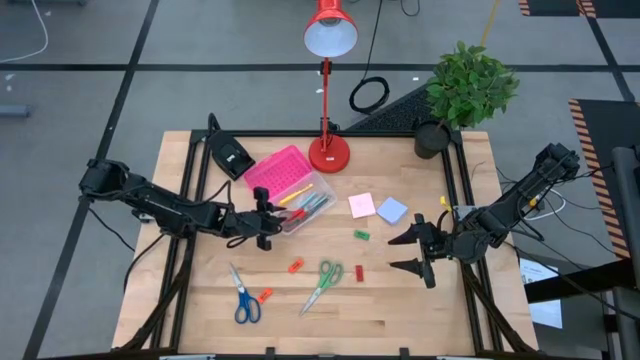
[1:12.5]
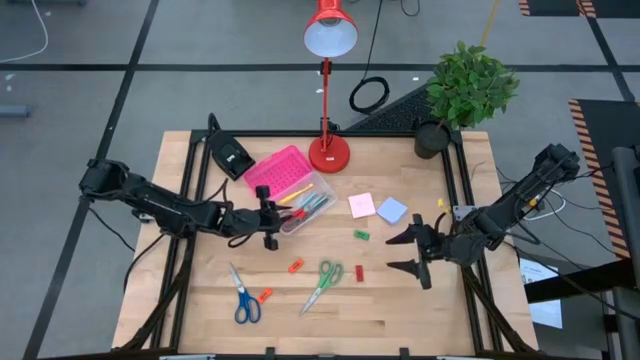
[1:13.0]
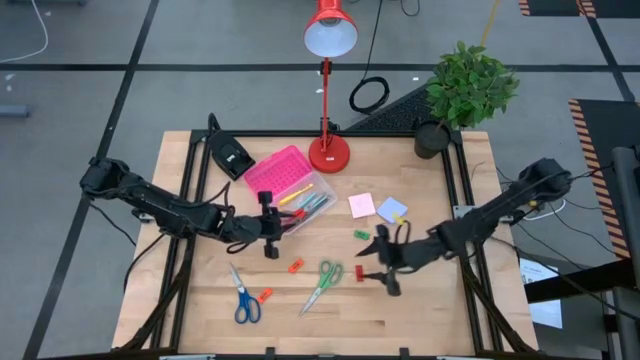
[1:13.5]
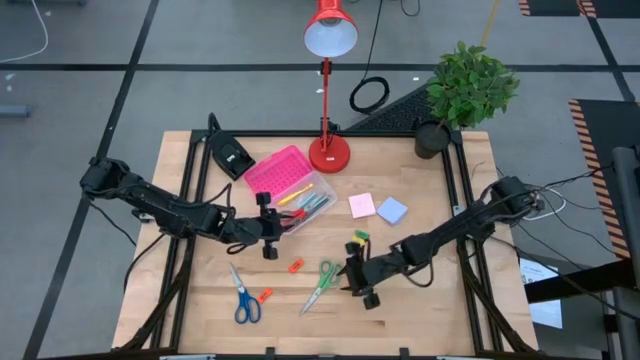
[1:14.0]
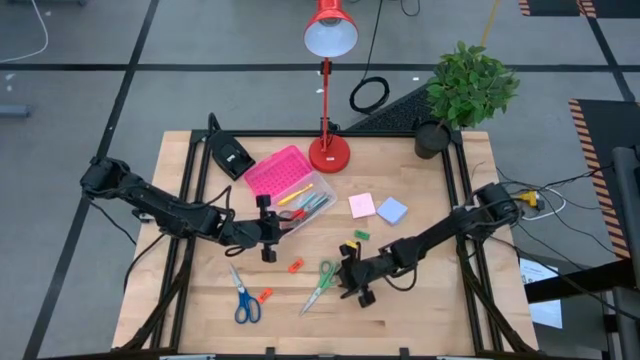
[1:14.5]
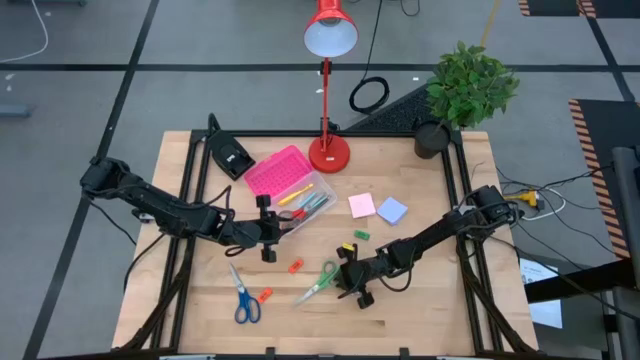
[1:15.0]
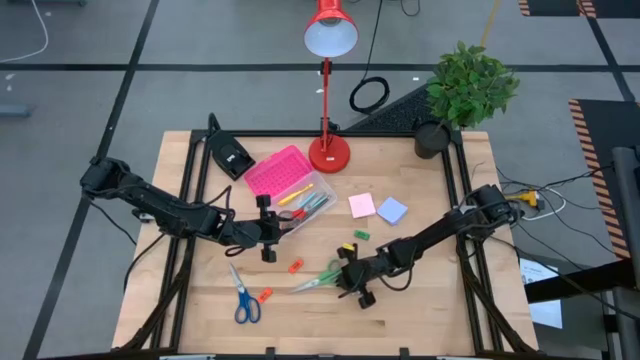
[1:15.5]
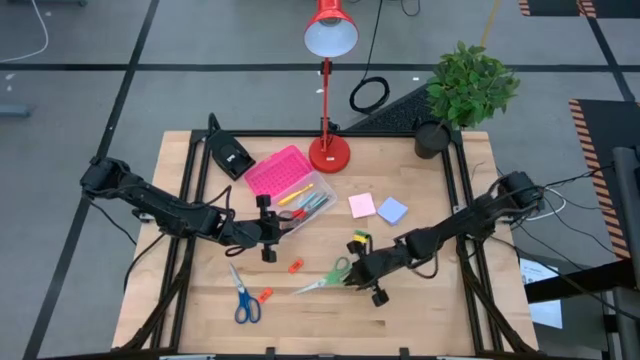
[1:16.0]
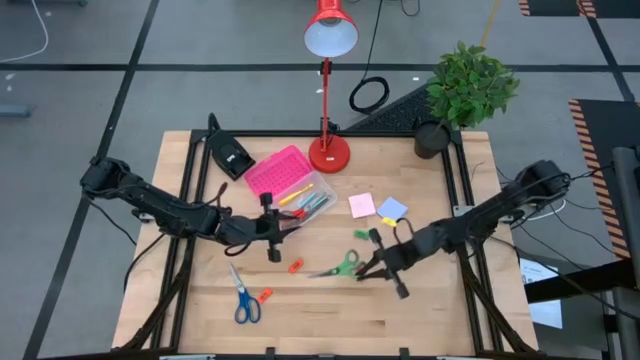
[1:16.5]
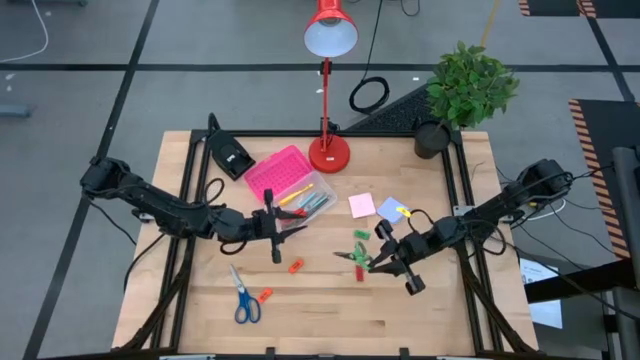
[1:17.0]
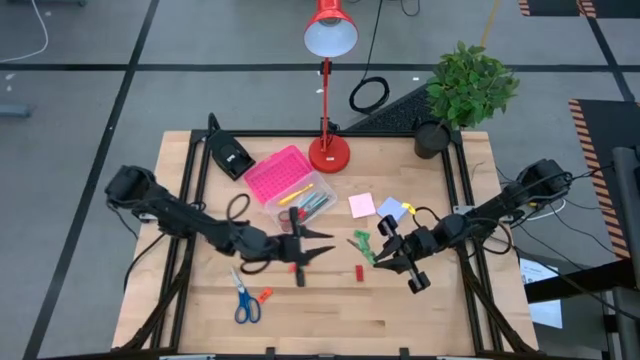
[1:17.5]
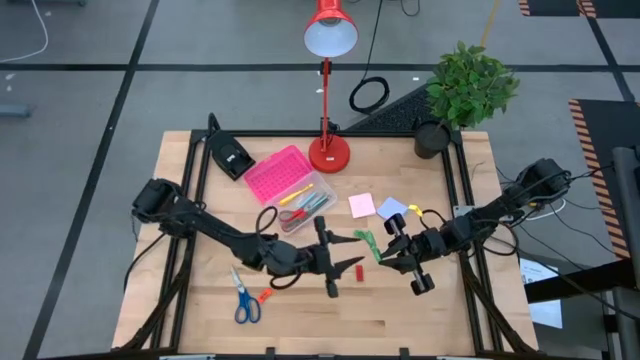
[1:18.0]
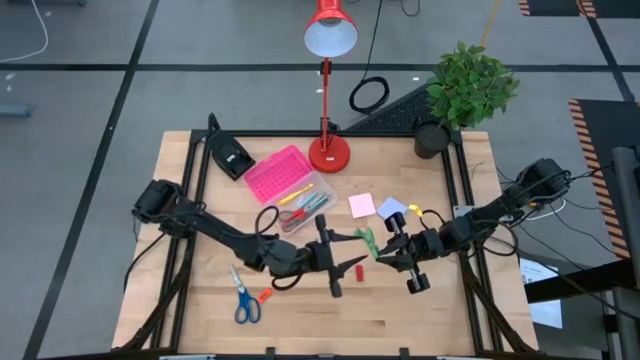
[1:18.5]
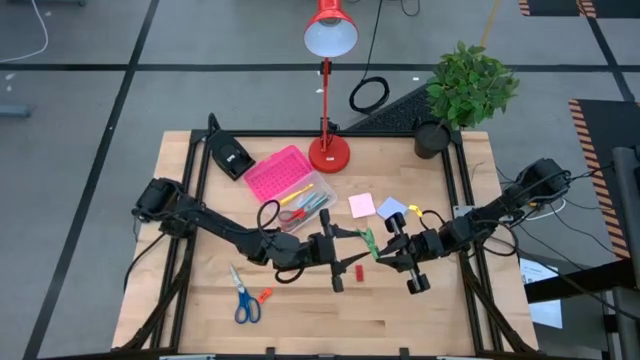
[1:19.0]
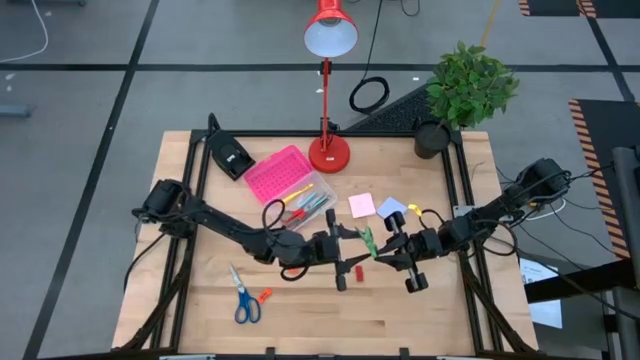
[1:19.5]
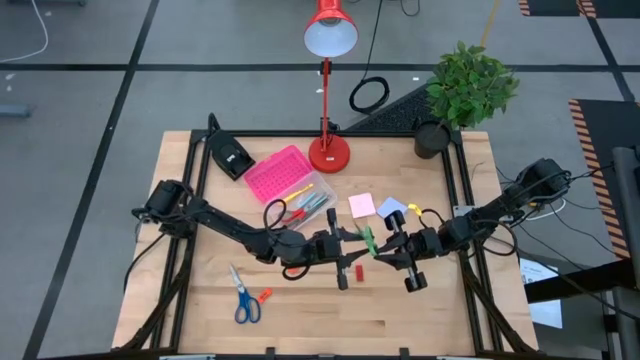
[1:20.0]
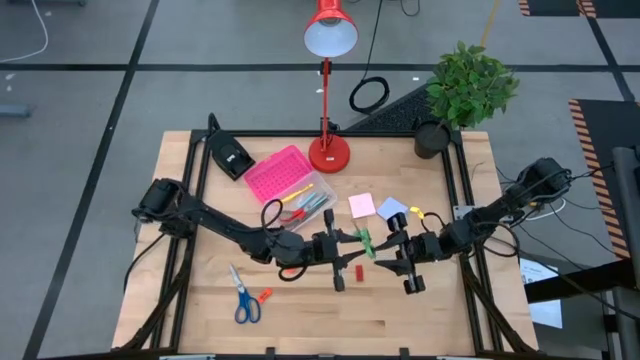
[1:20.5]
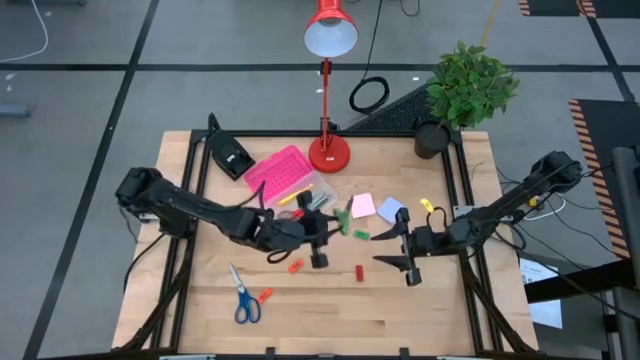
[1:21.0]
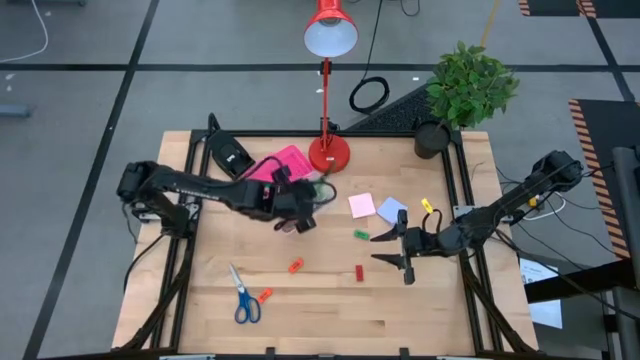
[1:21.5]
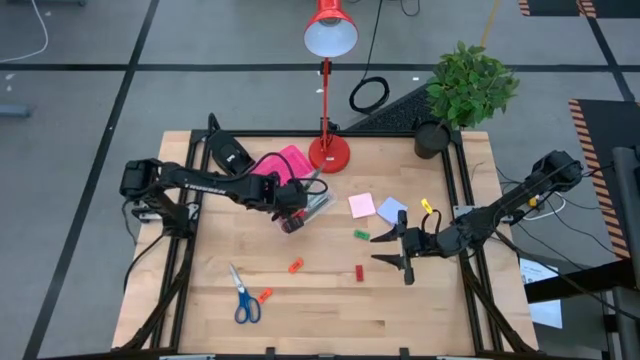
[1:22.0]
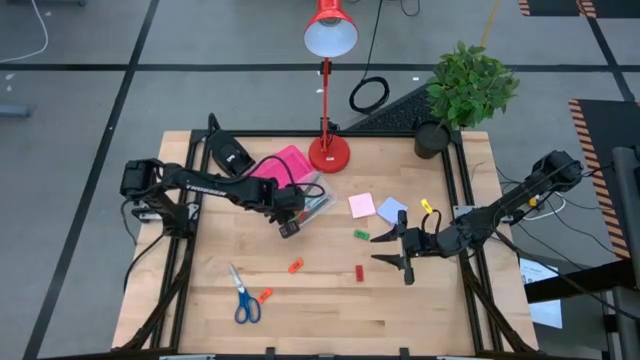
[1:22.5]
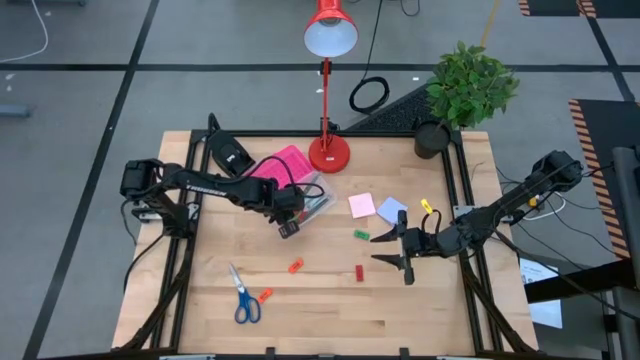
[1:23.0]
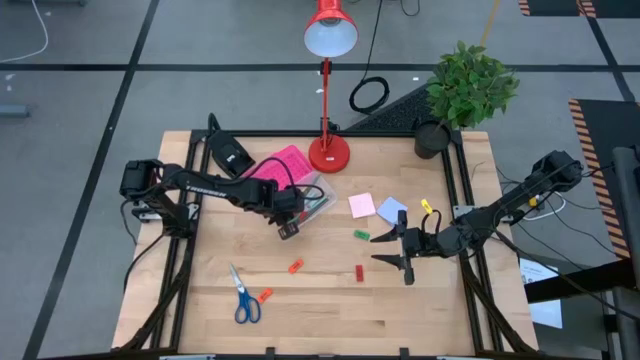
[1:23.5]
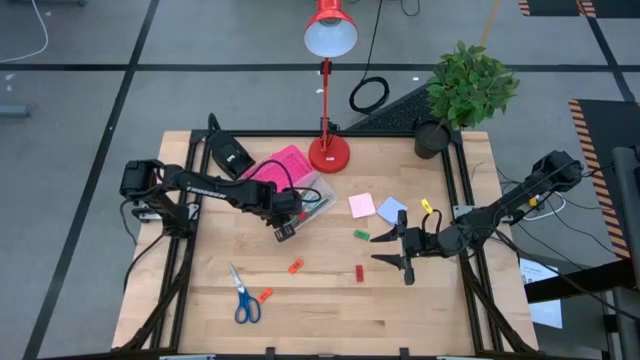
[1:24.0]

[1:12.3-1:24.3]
Task: Pack school essentials
Put the green scissors into the pink supply box

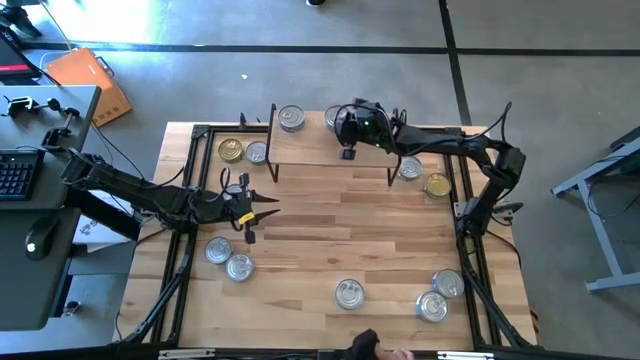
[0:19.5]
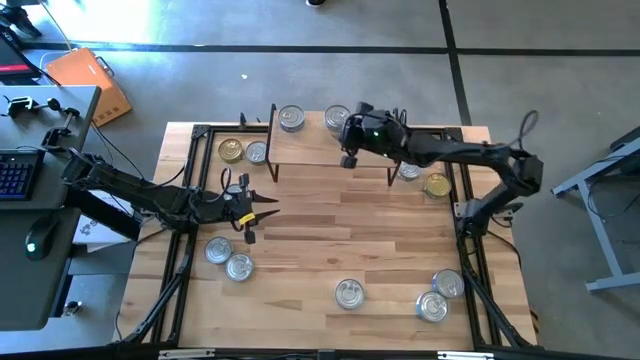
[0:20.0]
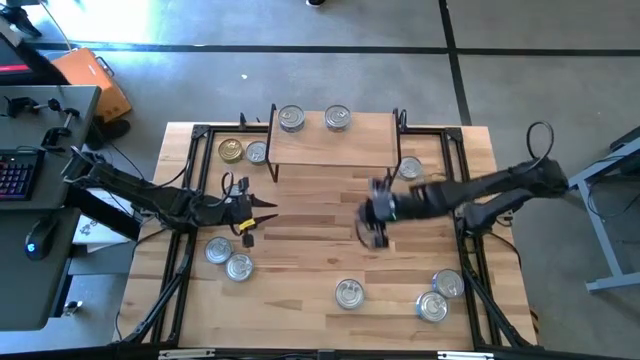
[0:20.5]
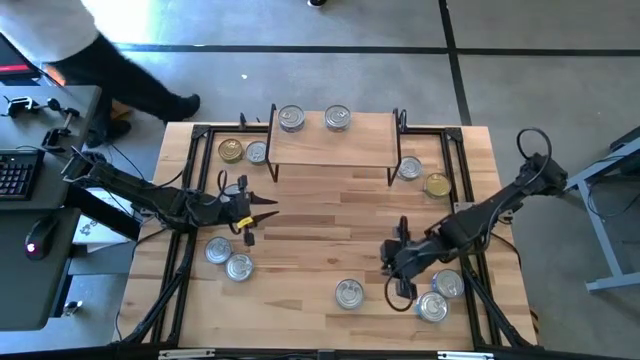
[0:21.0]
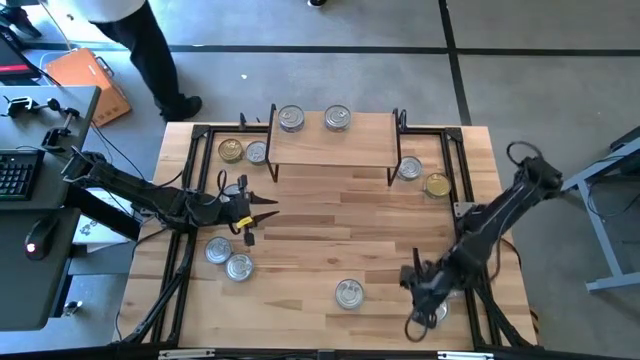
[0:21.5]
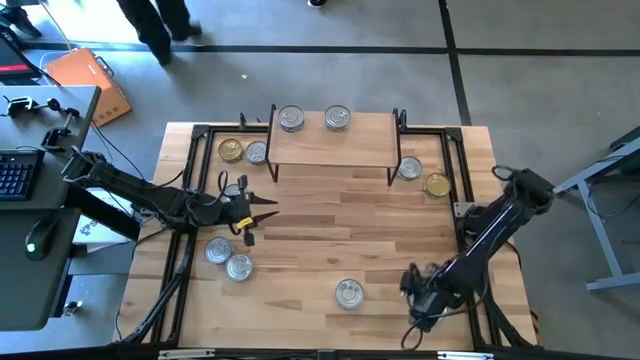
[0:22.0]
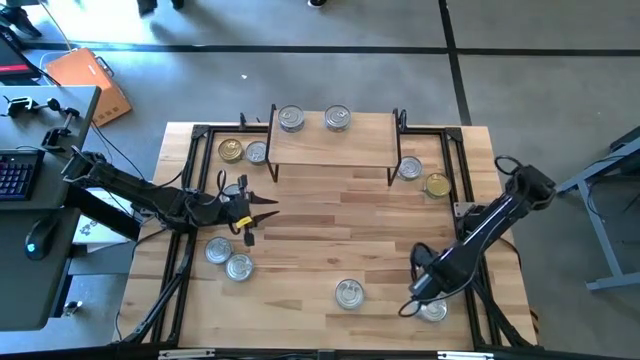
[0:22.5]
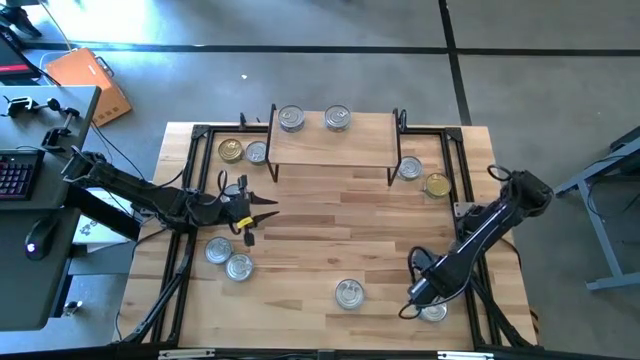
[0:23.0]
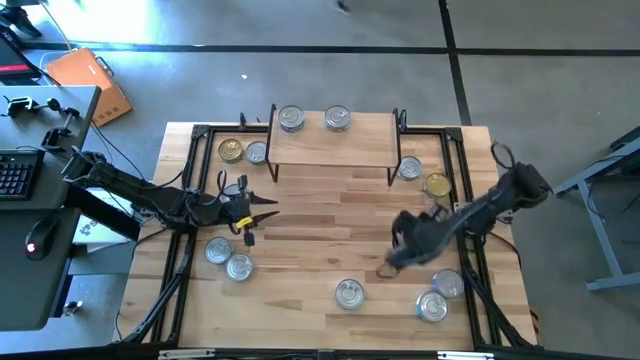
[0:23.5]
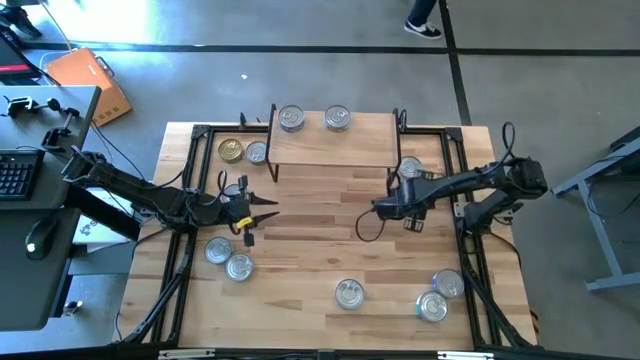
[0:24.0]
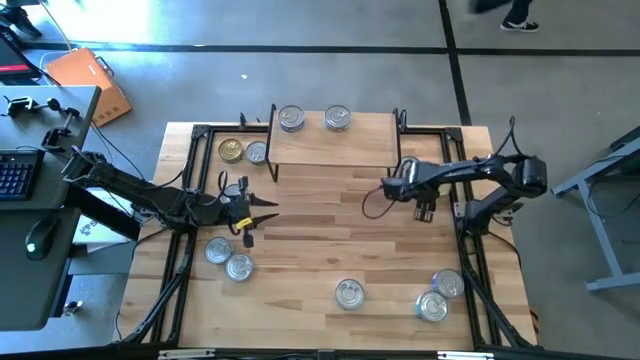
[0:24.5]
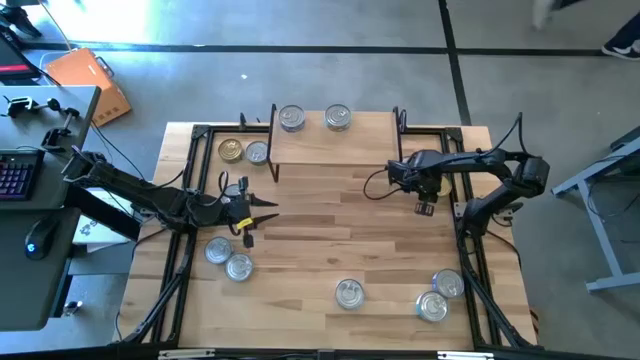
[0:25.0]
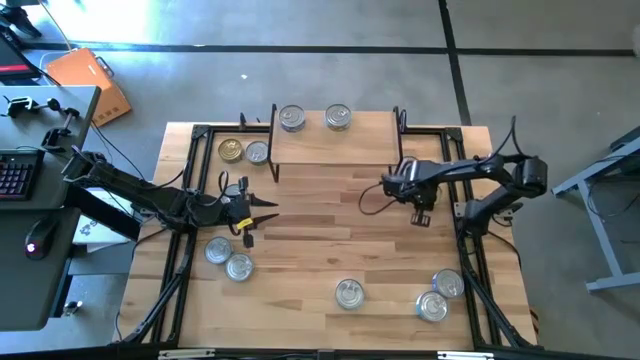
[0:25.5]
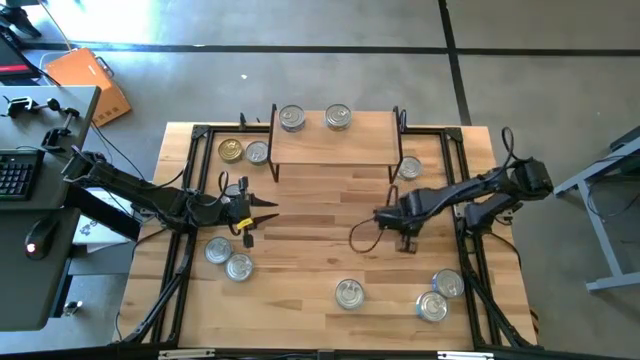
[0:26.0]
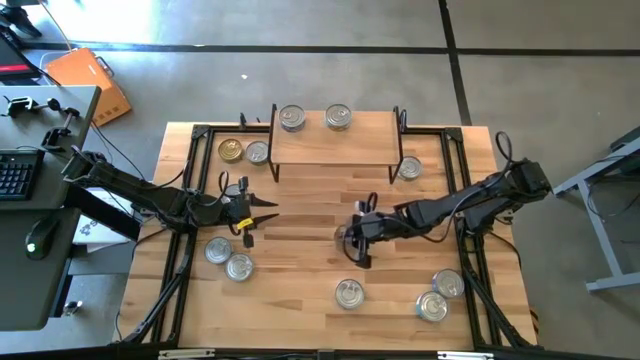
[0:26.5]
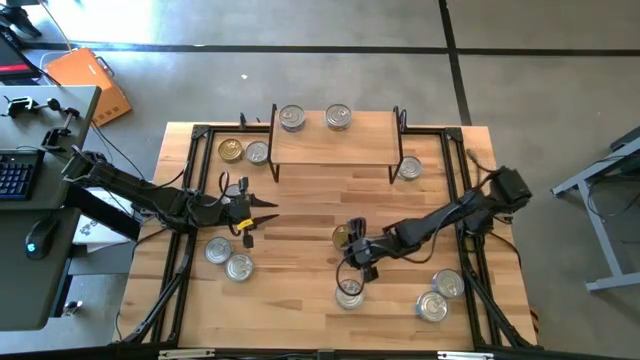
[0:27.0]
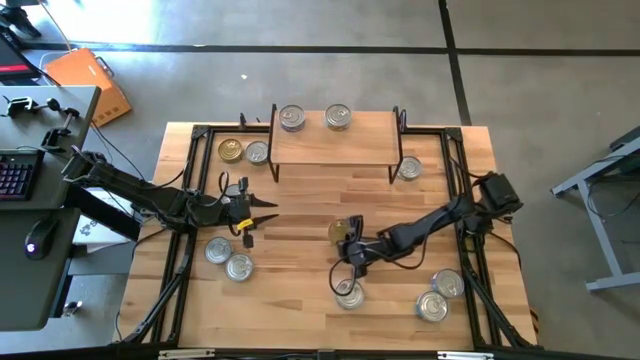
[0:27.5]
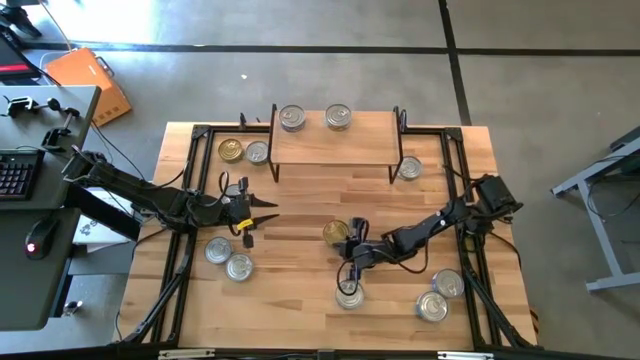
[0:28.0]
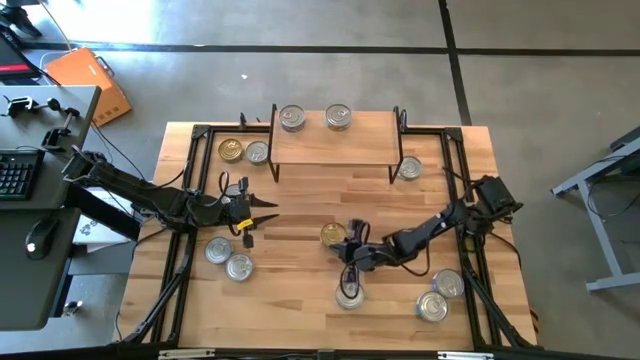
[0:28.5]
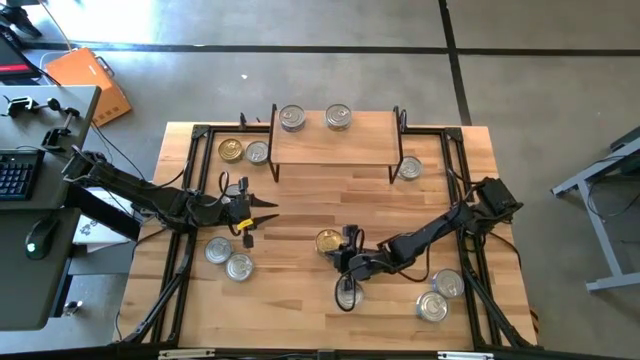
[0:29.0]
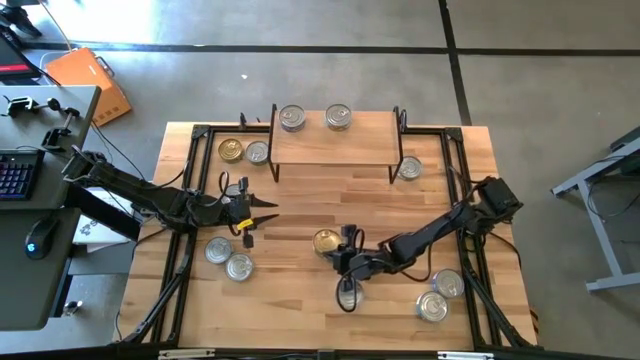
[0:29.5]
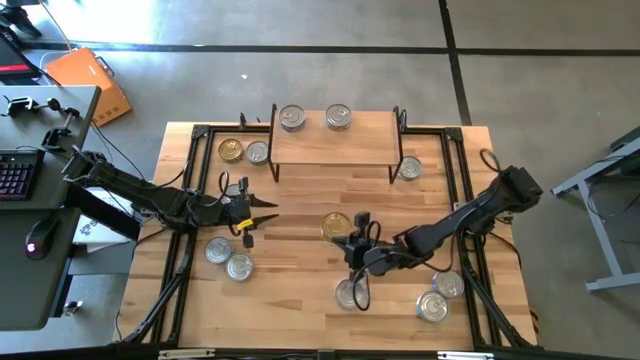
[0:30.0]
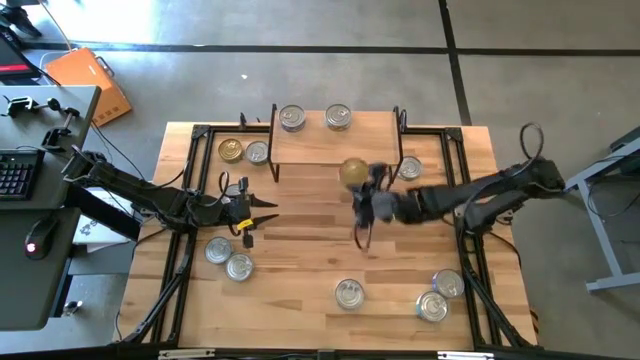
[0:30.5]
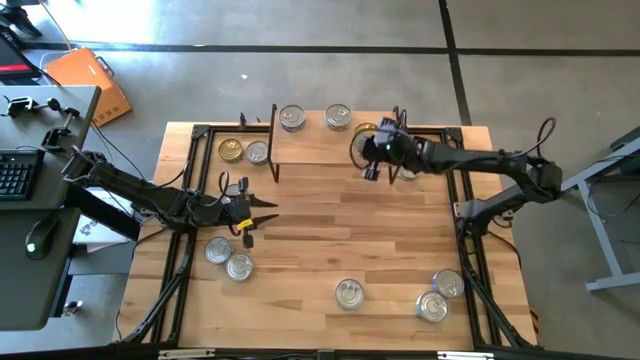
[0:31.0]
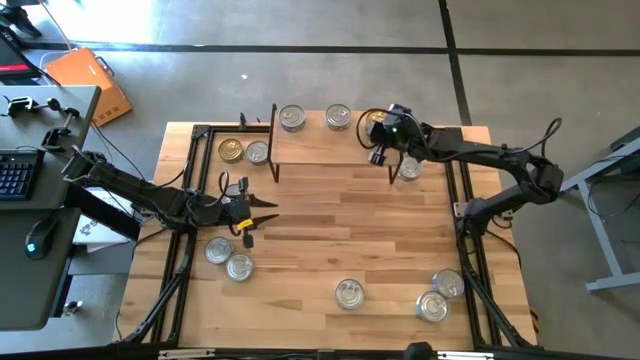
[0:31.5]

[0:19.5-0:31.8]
Task: Stack canned seafood by type on shelf
Put the green tuna can on the shelf
